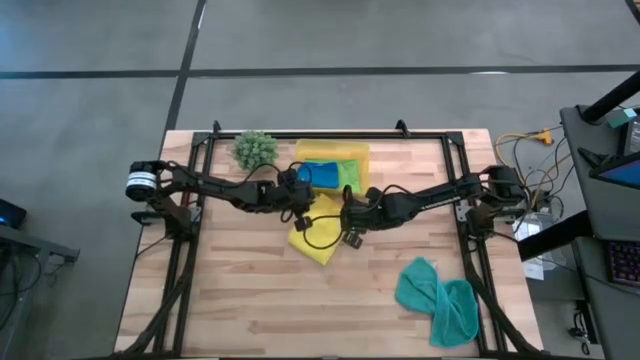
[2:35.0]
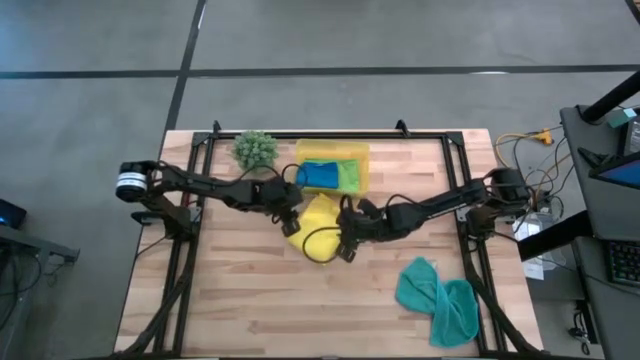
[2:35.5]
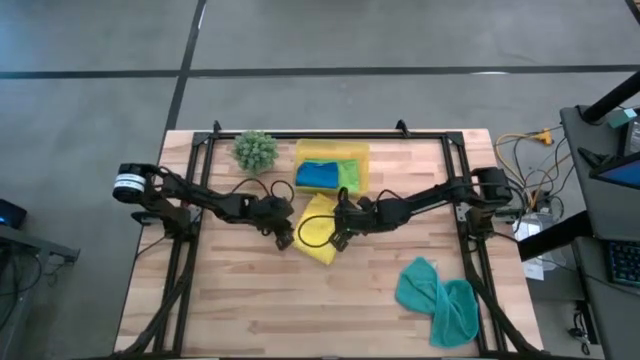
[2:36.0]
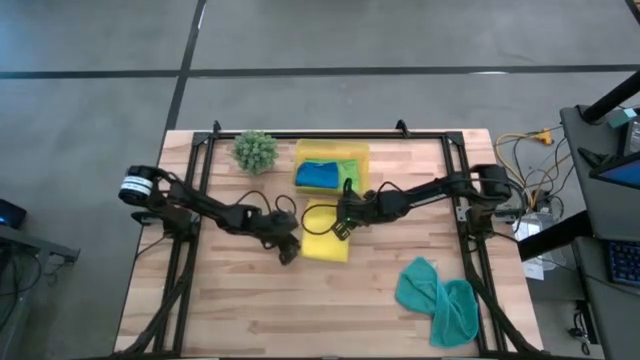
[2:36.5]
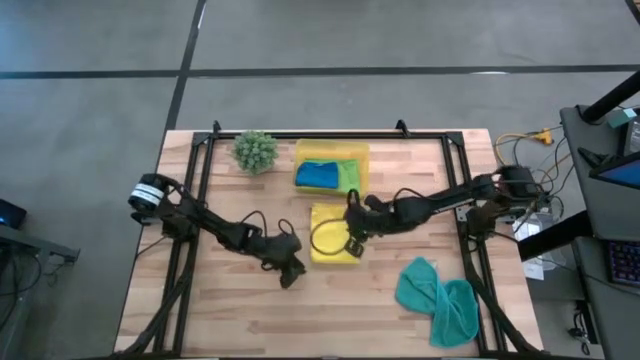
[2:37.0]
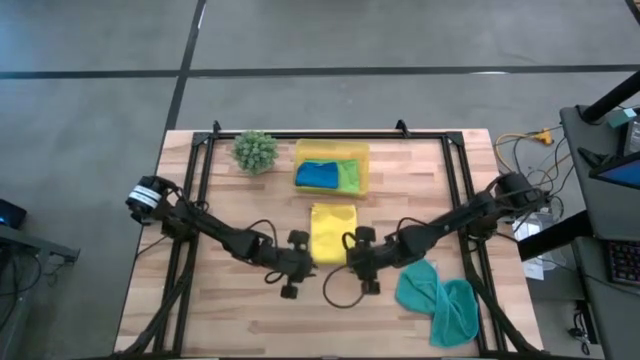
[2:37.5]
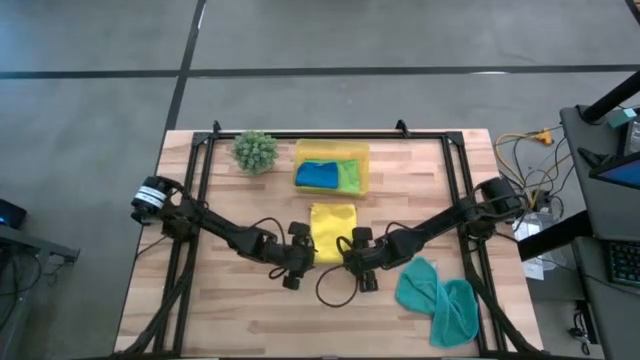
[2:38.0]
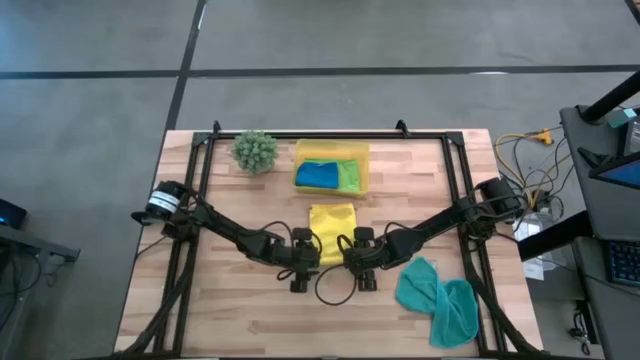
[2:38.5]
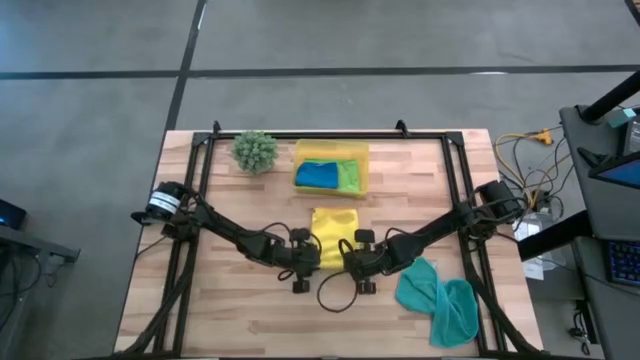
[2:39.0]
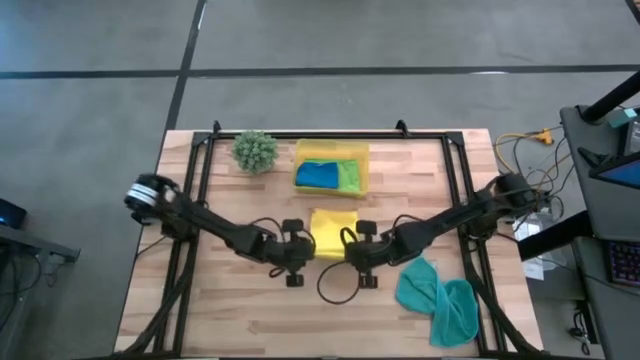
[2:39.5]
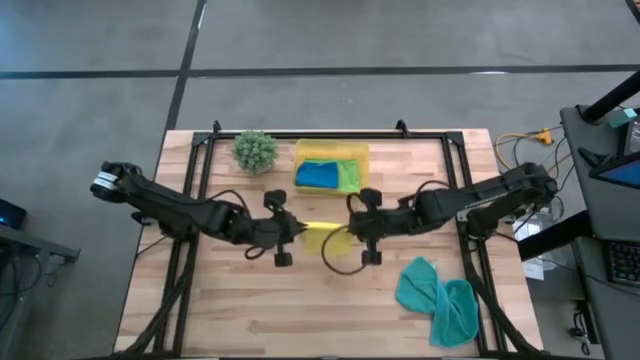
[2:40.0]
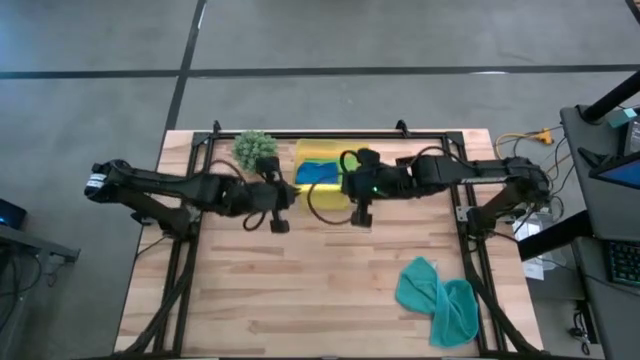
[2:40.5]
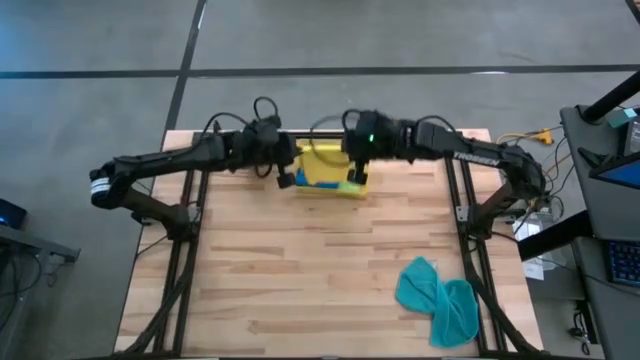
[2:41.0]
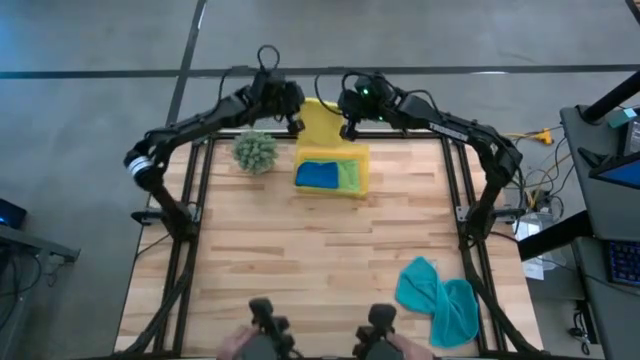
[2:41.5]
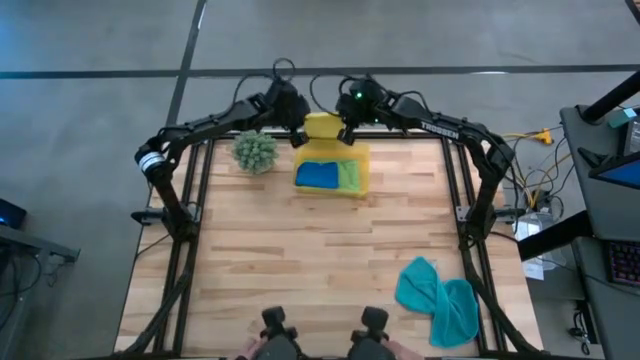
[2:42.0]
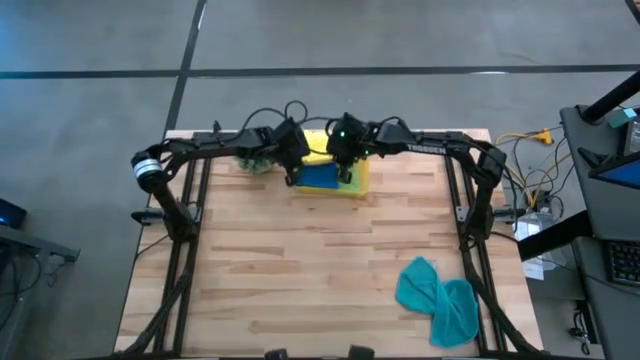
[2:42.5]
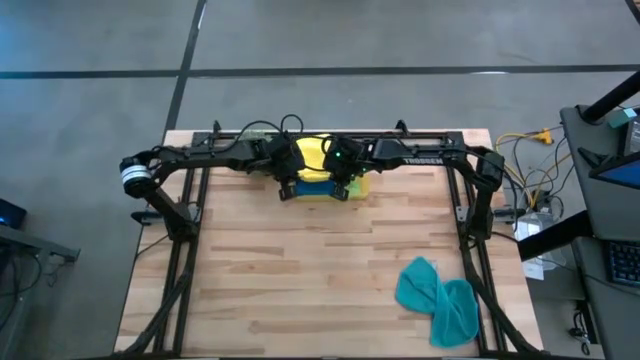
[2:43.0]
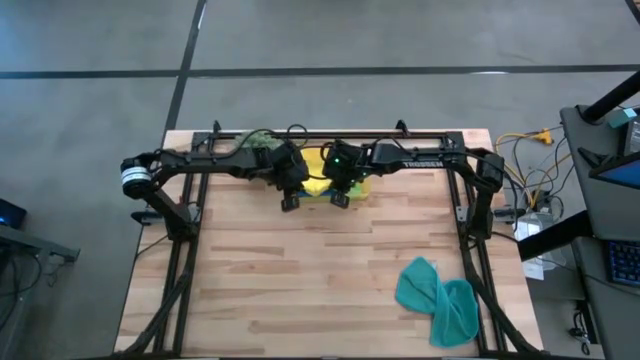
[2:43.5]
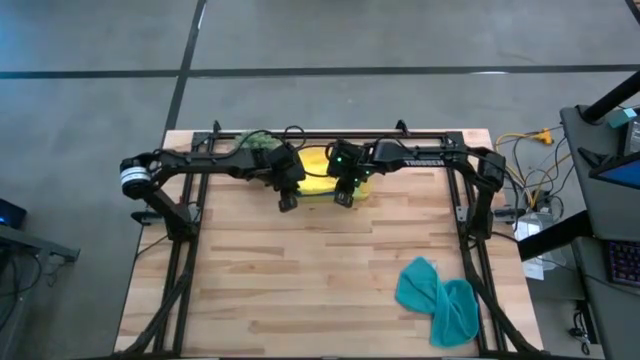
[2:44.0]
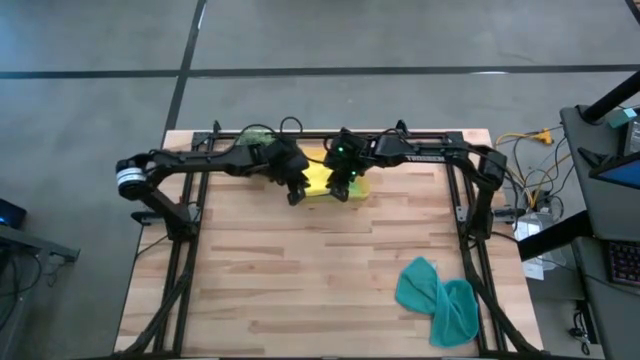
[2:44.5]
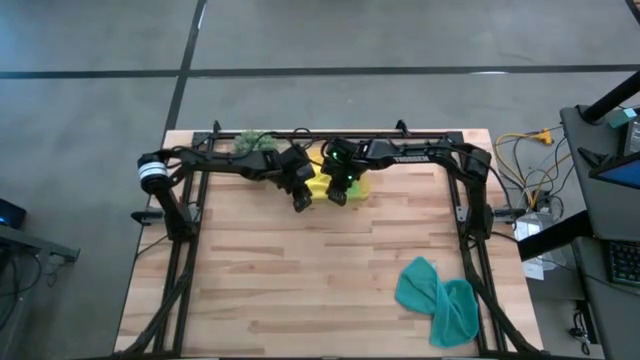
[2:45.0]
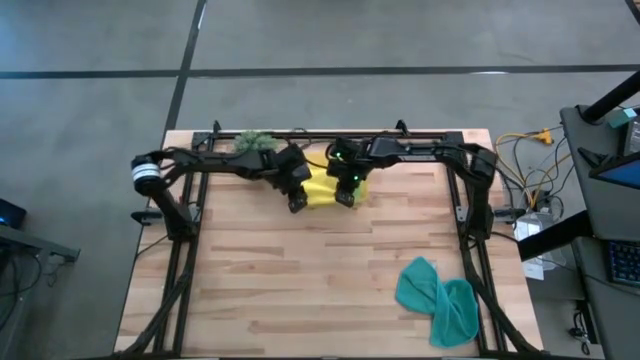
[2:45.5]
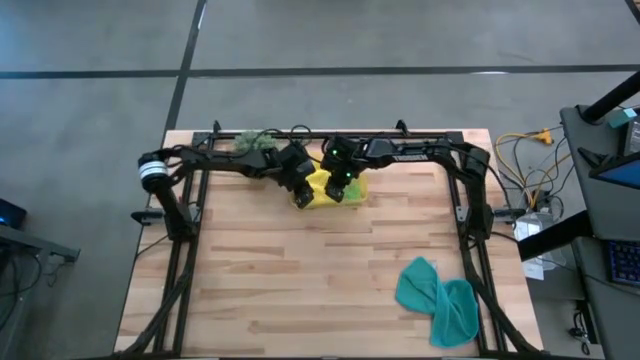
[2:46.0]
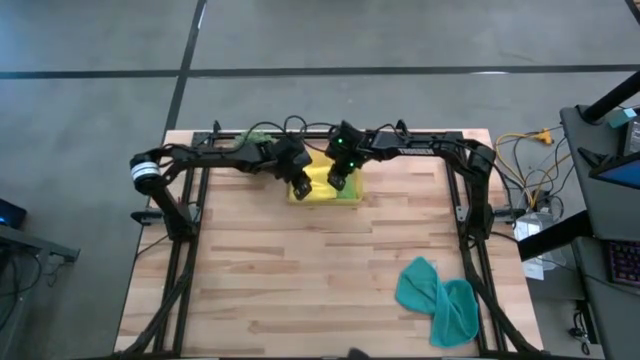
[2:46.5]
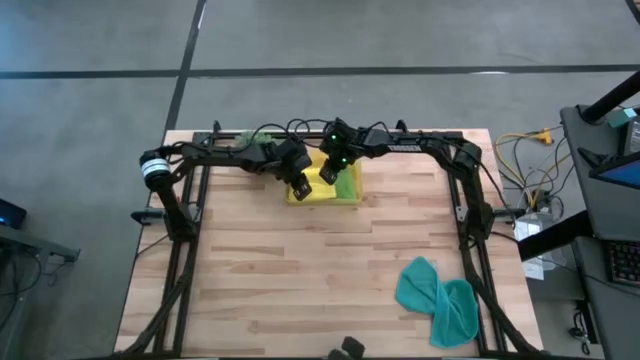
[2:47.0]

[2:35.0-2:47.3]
Task: Fold microfiber towels
Put the yellow towel into the yellow bin

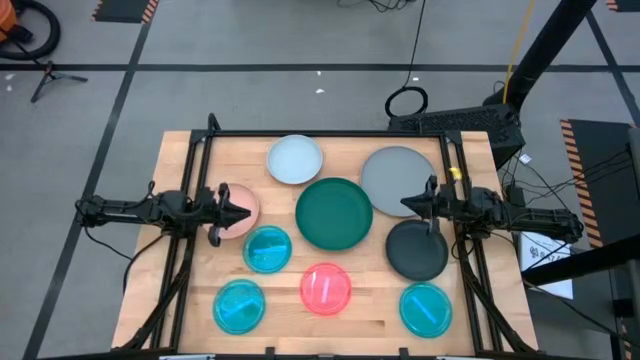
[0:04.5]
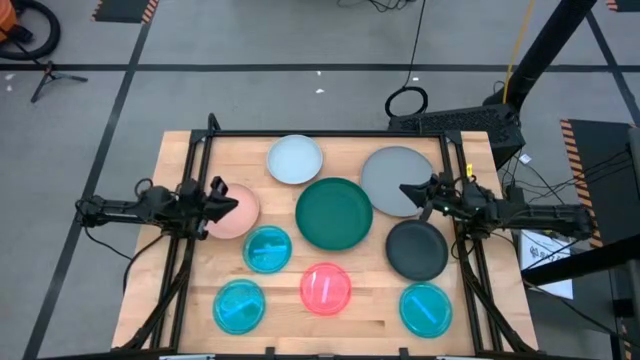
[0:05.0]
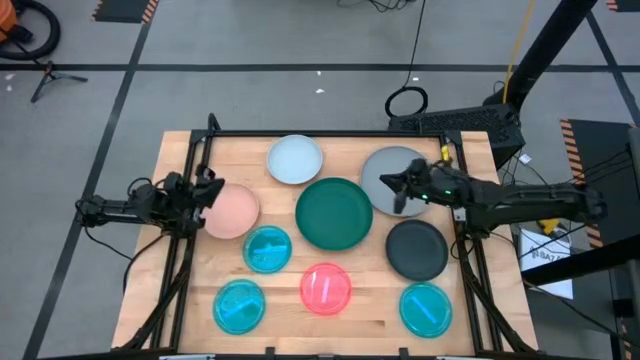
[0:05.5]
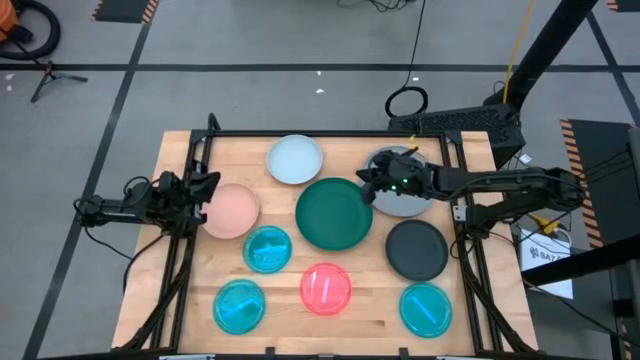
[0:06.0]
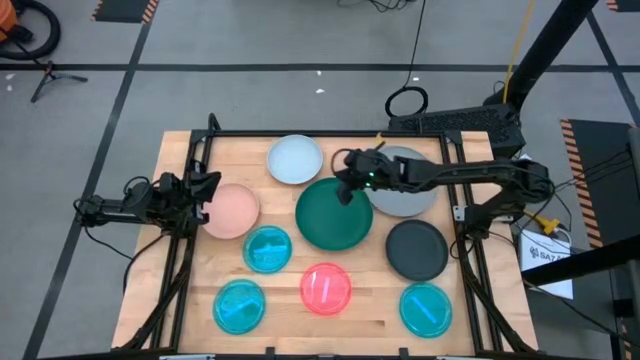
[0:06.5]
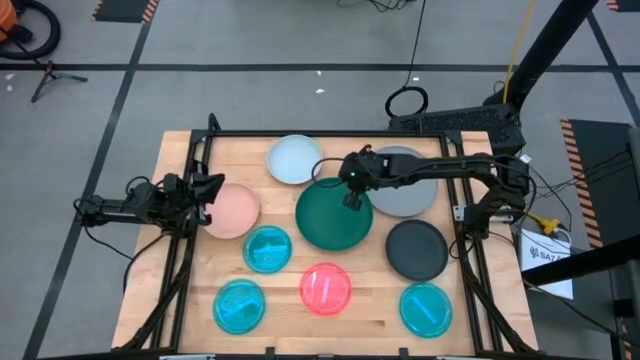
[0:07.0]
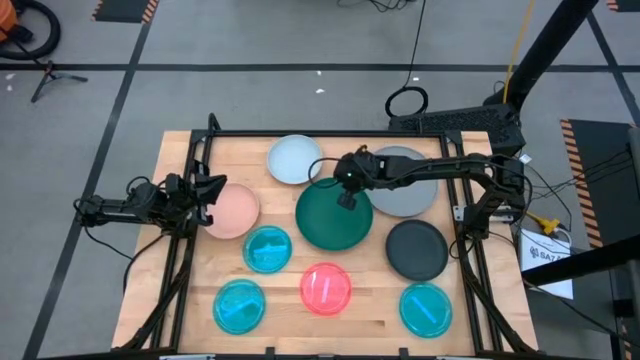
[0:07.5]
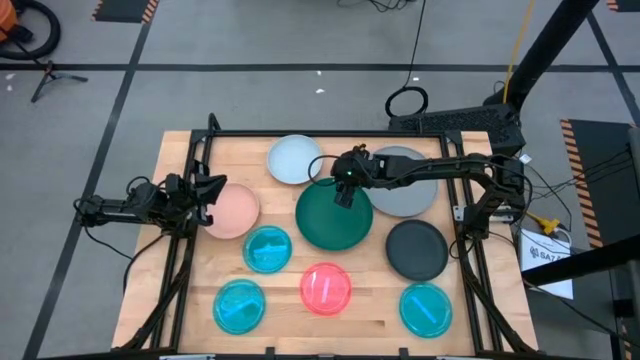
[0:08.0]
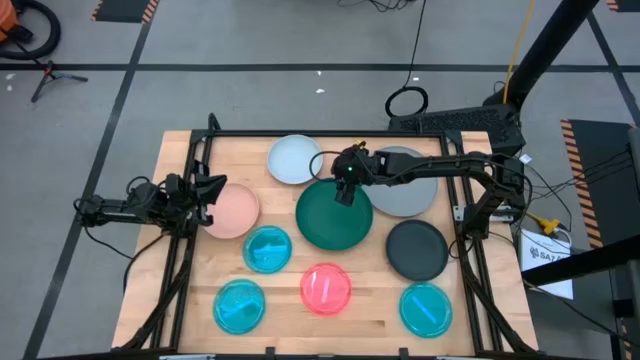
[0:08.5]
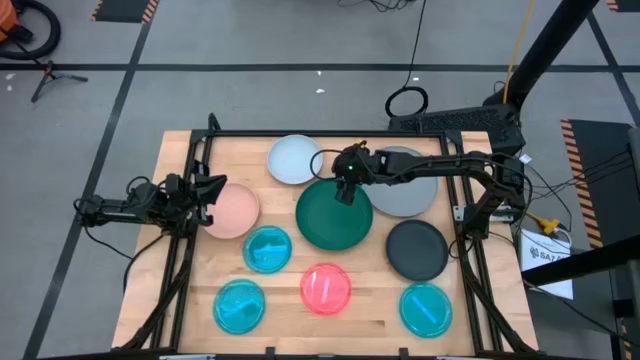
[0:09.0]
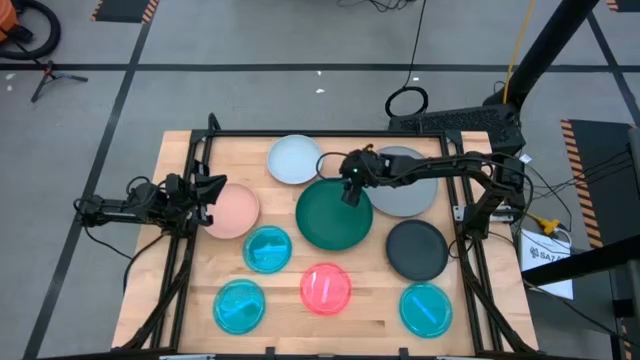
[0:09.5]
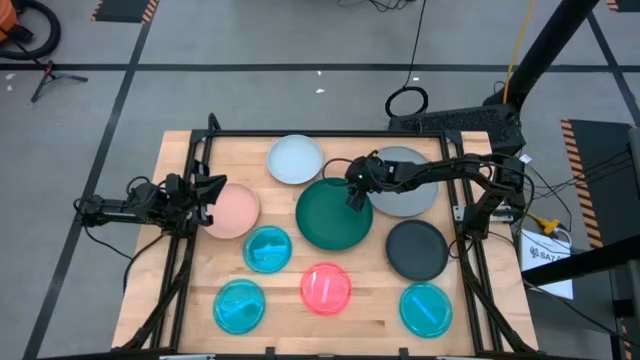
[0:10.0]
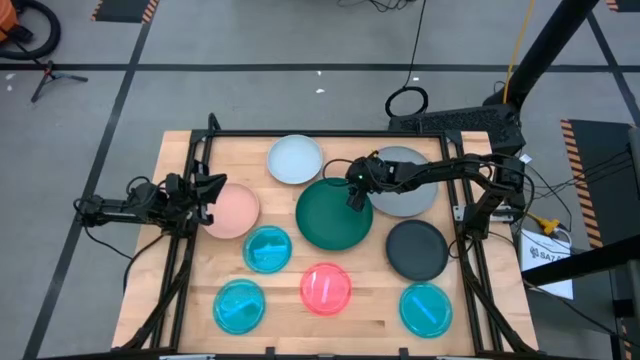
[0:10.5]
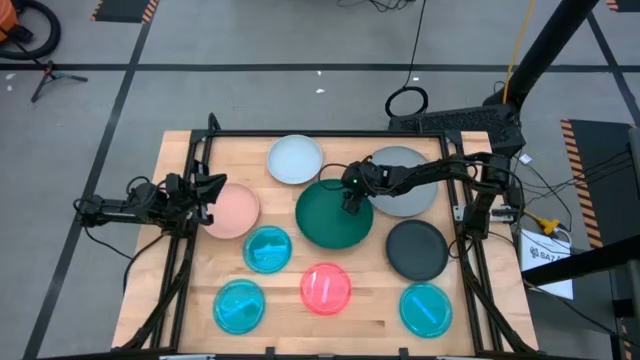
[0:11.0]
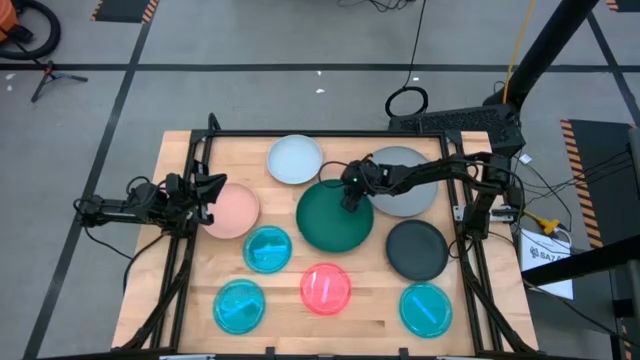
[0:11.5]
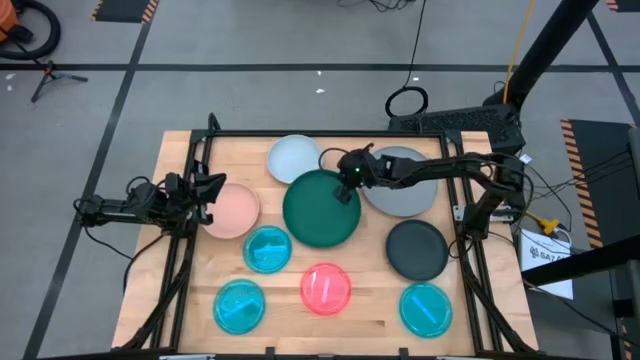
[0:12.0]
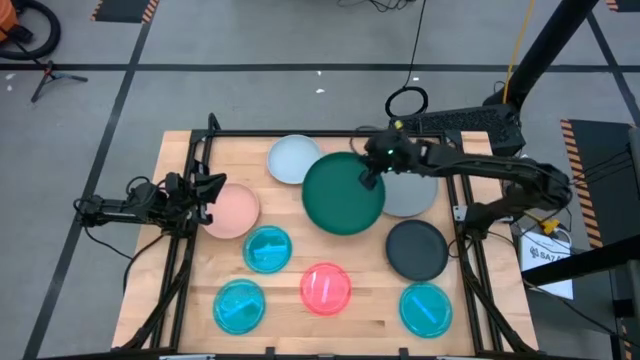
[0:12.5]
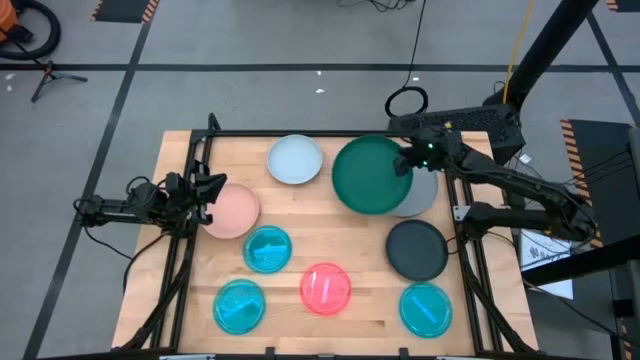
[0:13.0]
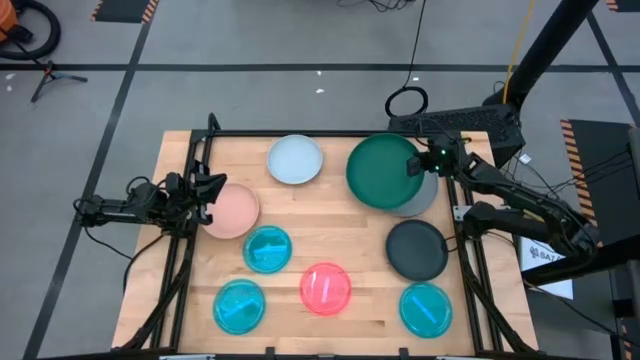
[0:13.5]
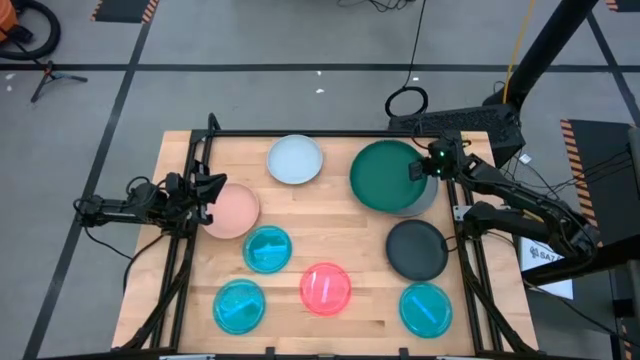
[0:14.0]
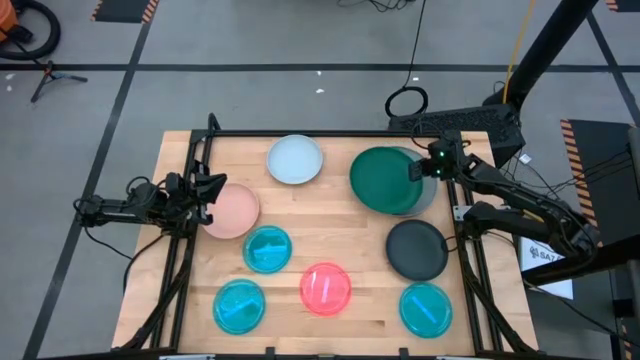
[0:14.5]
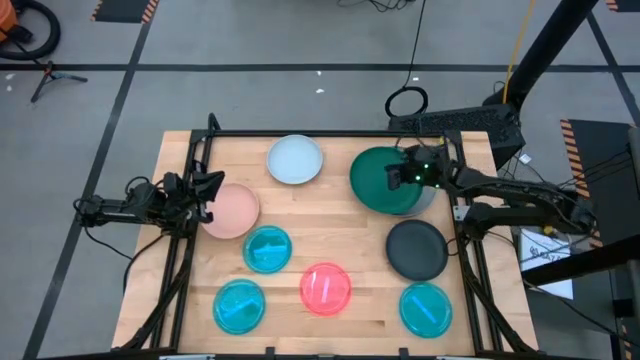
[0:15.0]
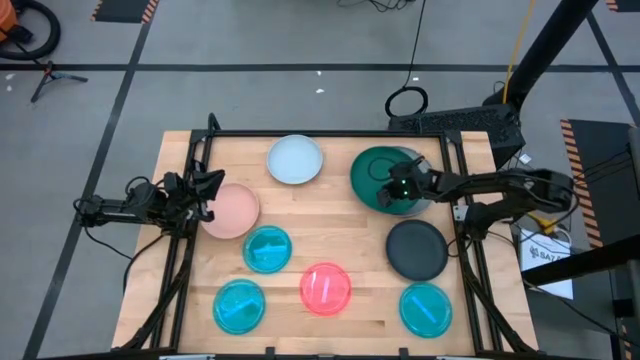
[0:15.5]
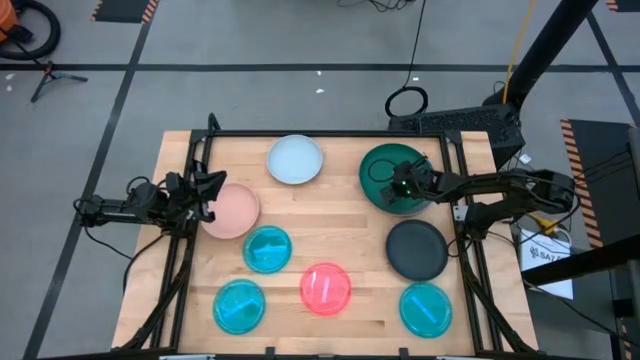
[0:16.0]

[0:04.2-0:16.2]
Task: Stack plastic plates
Stack the green plate on the gray plate
